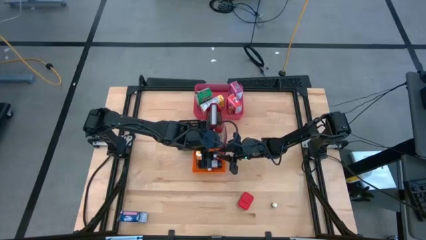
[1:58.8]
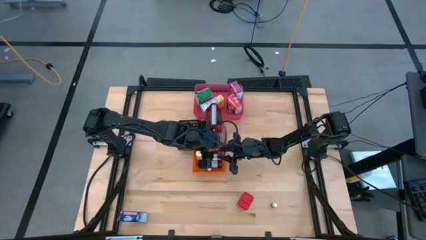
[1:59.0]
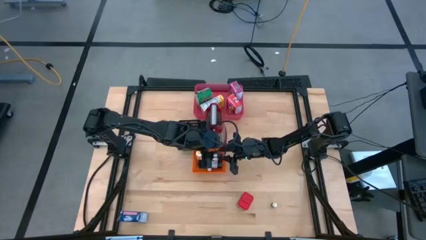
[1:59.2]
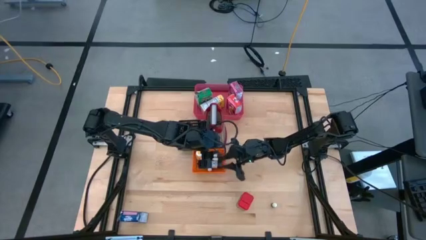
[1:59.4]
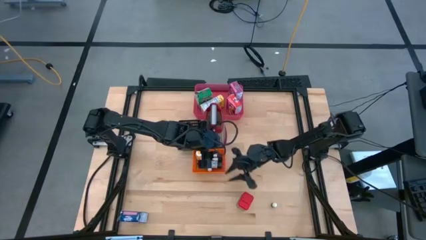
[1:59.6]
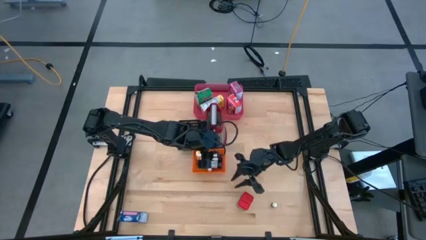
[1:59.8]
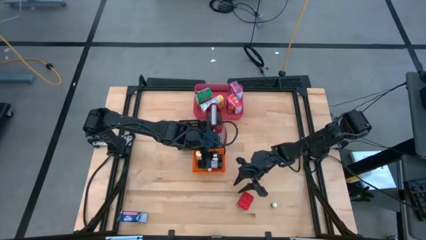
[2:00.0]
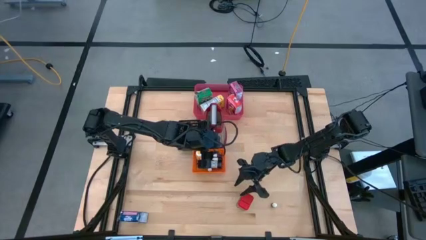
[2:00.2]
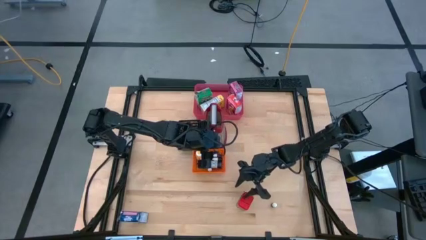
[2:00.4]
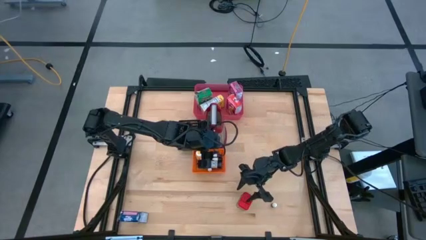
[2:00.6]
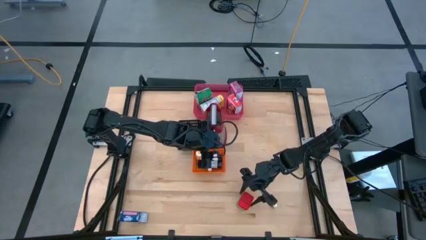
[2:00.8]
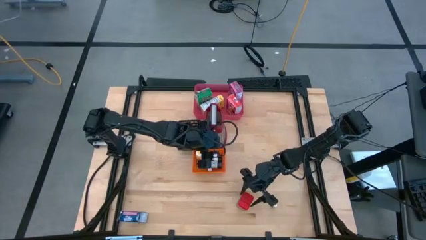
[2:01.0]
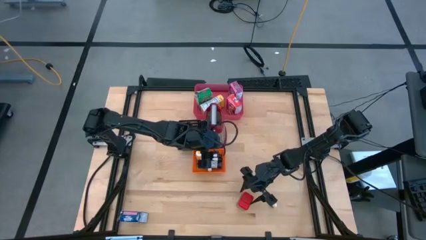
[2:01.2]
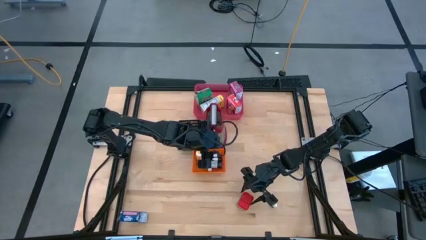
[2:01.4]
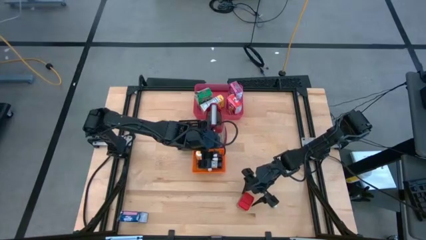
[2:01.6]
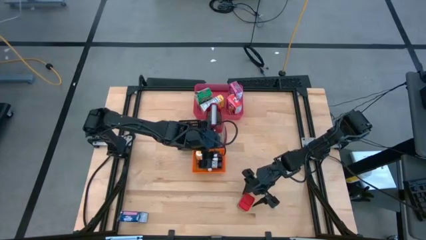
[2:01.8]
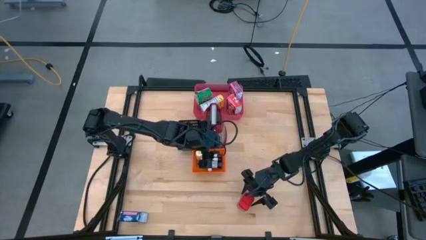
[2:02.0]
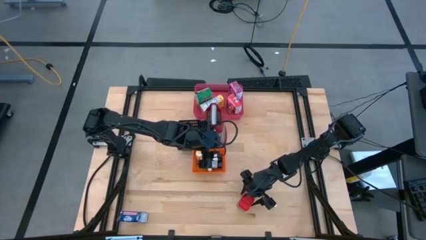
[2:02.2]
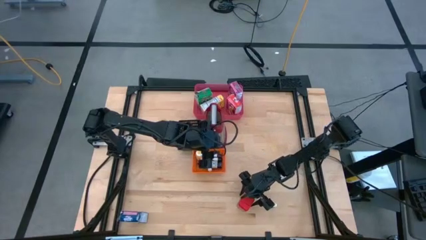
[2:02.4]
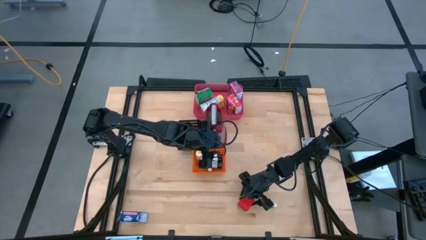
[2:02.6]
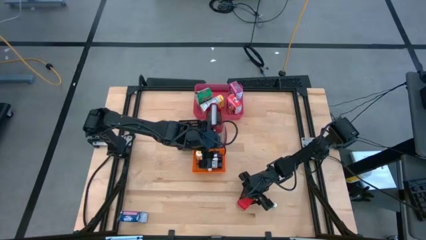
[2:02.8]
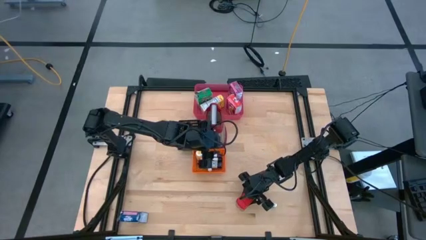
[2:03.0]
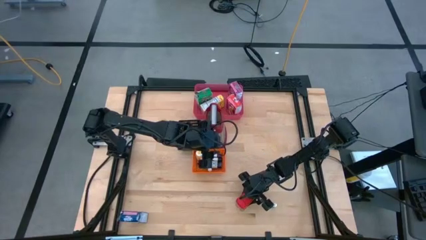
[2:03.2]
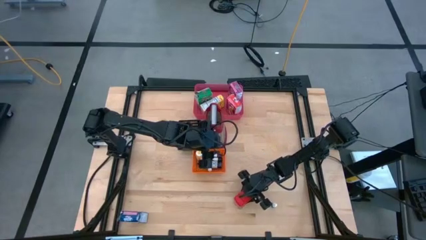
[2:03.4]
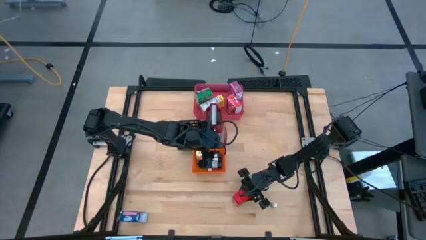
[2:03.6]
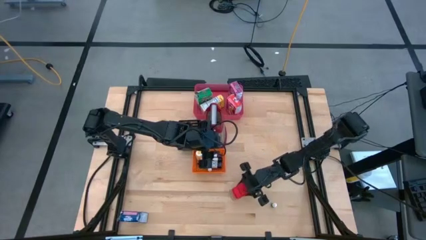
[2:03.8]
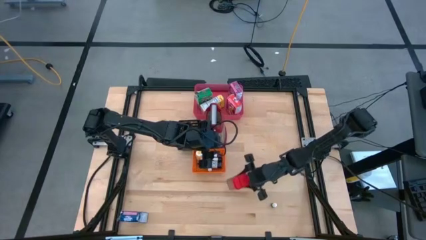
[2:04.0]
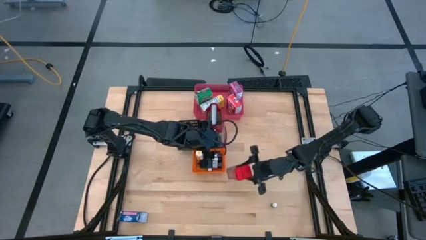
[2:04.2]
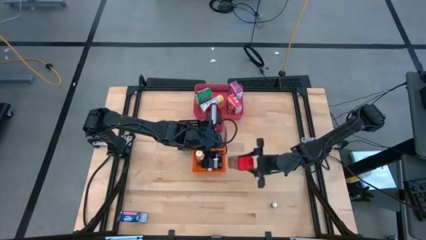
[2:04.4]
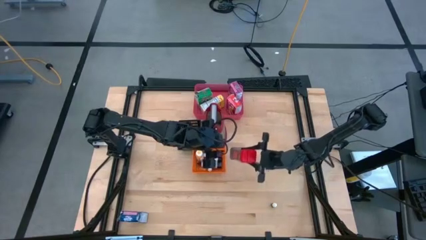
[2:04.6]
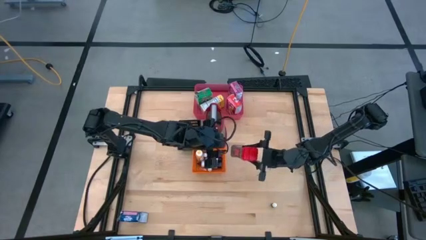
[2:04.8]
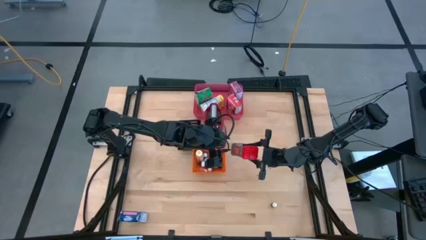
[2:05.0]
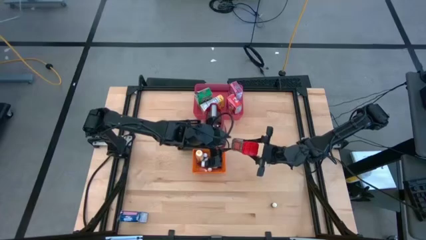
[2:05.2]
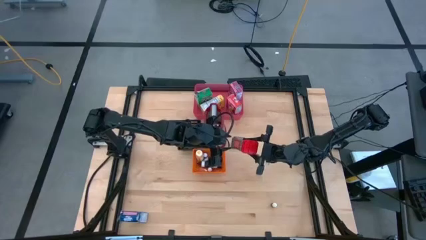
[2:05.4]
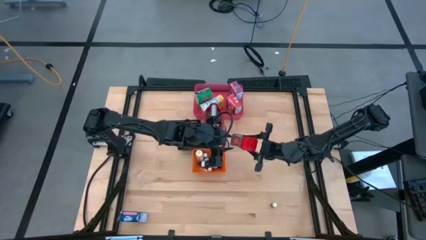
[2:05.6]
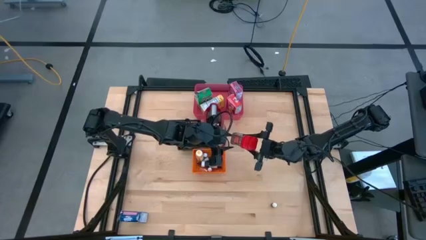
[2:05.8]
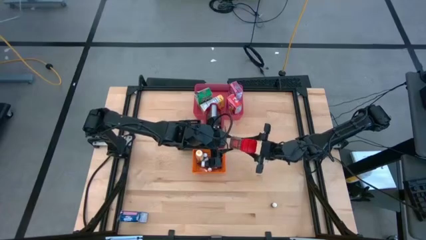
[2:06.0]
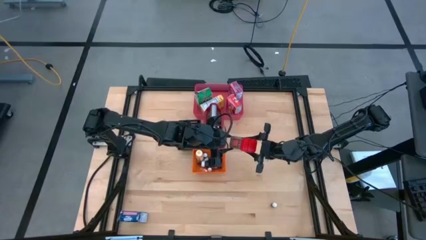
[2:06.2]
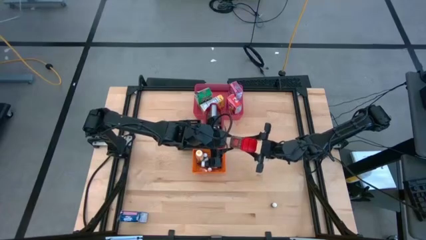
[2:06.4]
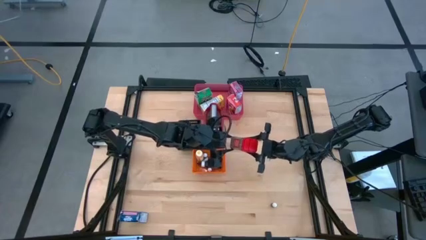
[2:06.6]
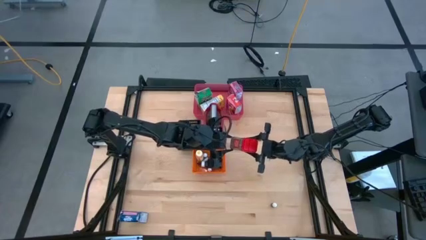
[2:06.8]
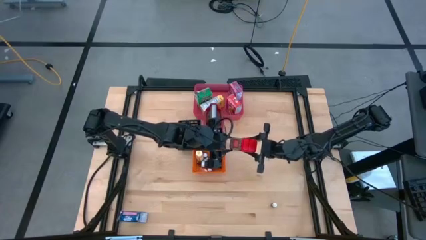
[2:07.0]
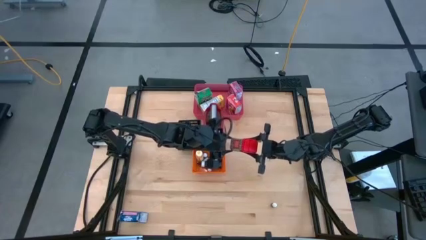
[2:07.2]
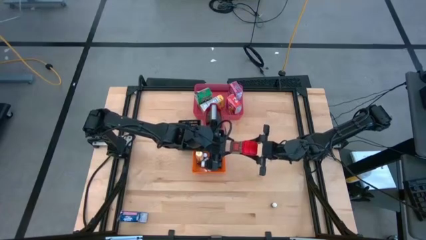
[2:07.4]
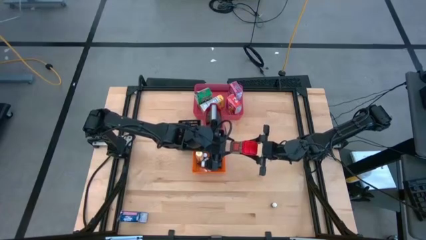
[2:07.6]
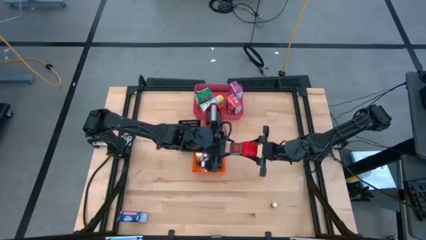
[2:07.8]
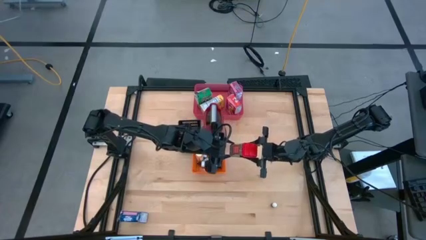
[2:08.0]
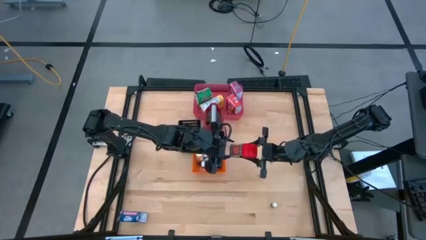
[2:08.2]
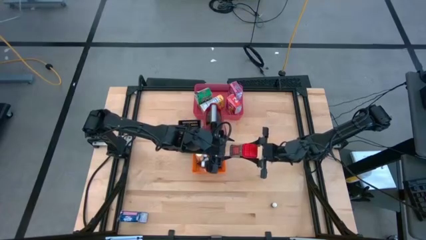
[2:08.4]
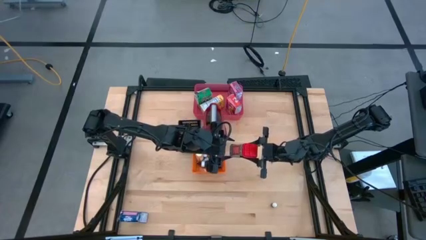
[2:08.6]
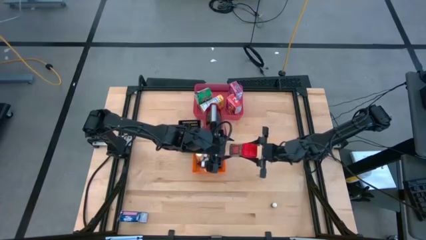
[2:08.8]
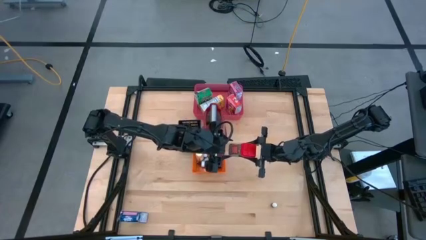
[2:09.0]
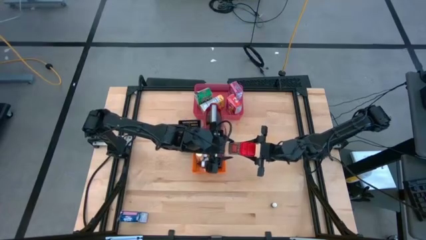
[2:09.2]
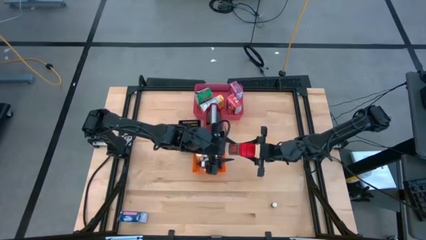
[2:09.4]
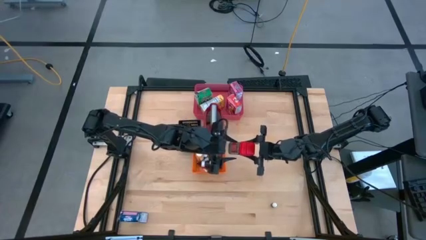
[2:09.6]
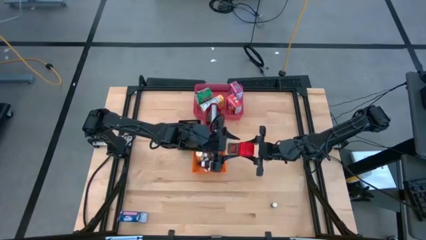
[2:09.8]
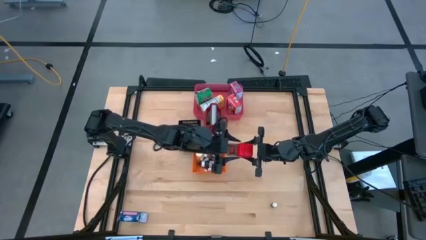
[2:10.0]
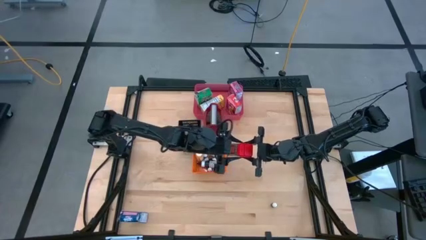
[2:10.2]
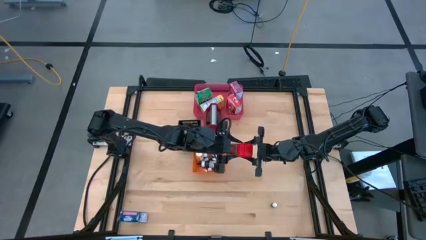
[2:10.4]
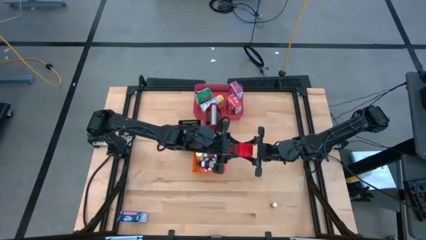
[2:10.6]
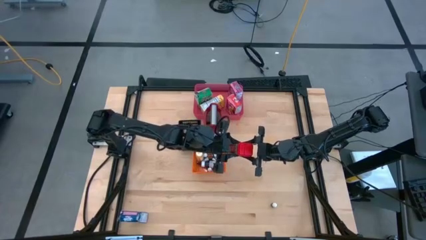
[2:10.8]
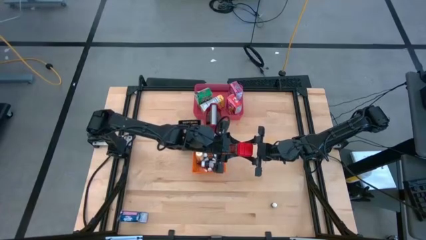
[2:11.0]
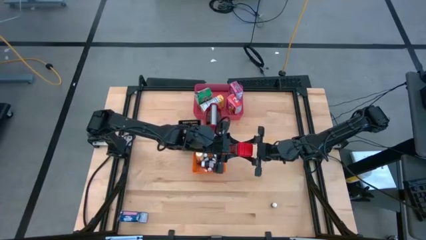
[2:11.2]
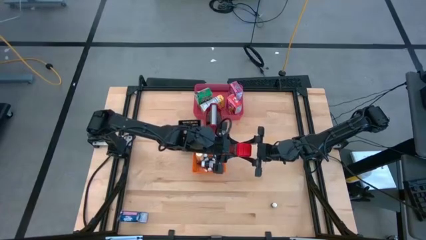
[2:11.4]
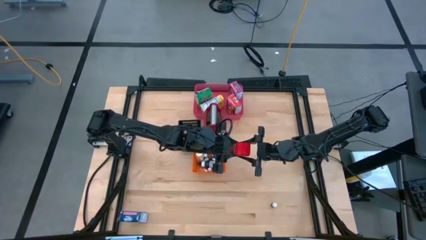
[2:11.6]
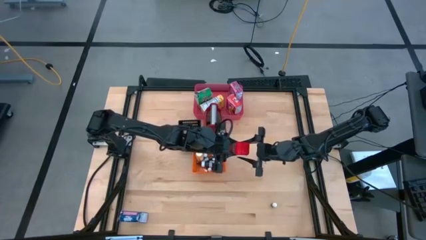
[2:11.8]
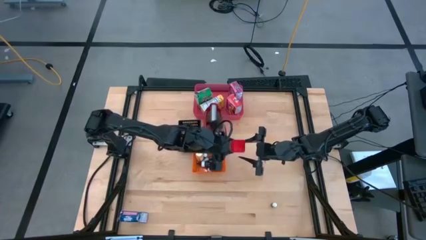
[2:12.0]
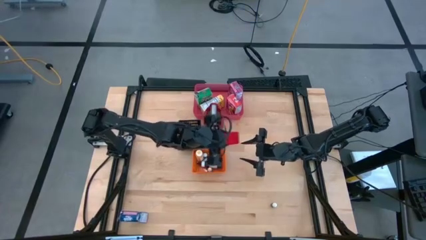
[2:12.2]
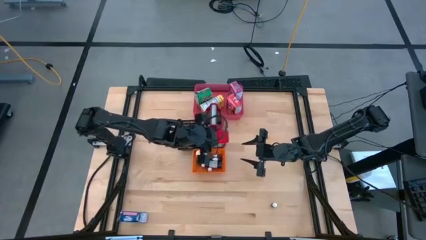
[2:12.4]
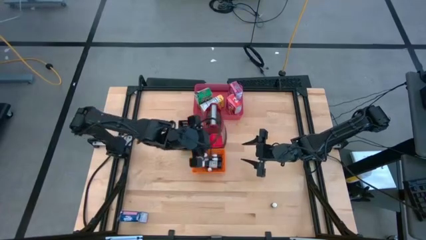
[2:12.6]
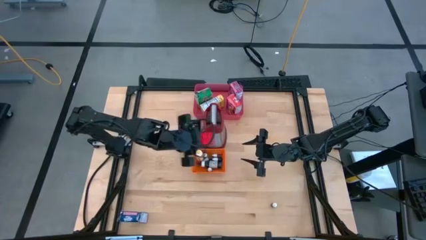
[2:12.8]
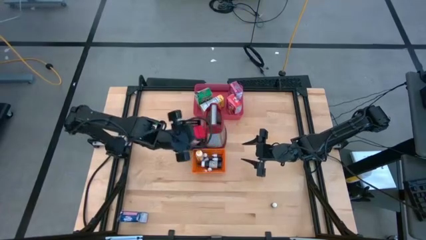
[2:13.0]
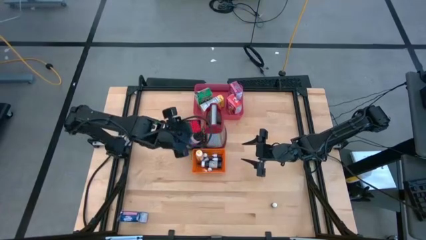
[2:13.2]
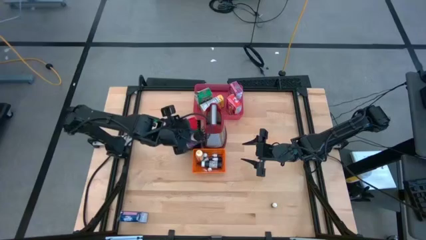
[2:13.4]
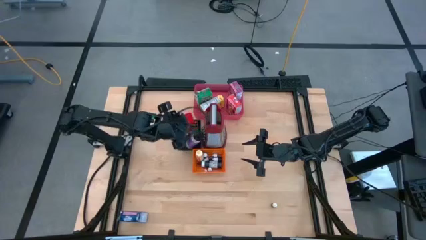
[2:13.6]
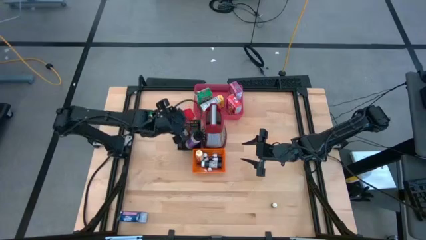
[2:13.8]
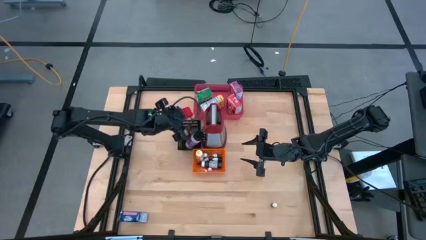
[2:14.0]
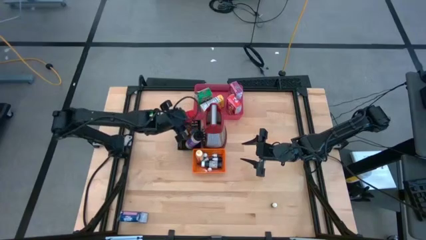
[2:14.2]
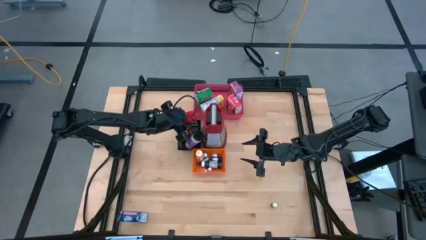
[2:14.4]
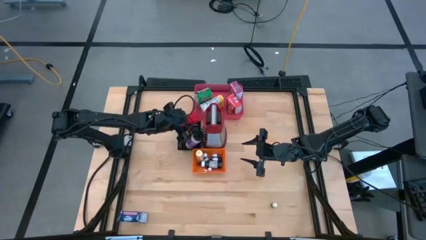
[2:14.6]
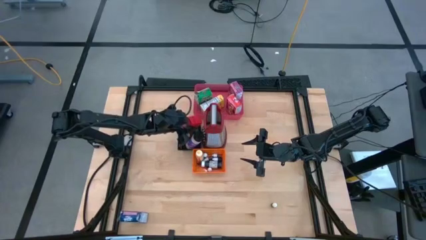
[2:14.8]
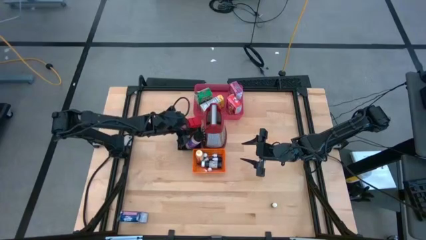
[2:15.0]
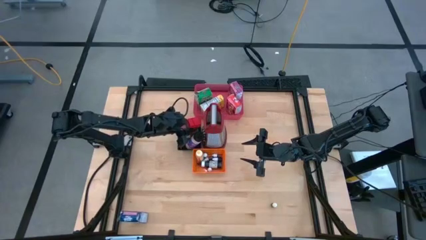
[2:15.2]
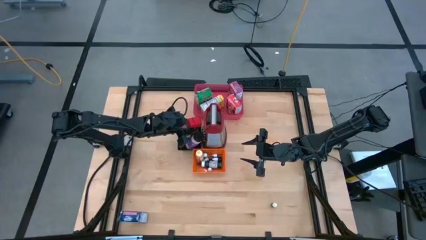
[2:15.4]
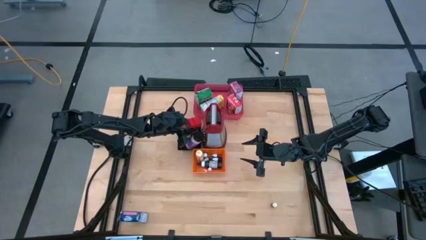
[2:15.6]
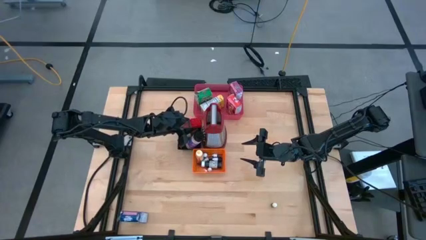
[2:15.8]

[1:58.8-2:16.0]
Task: Pick & Place Kitchen Items
Put the red seasoning can into the black bin
